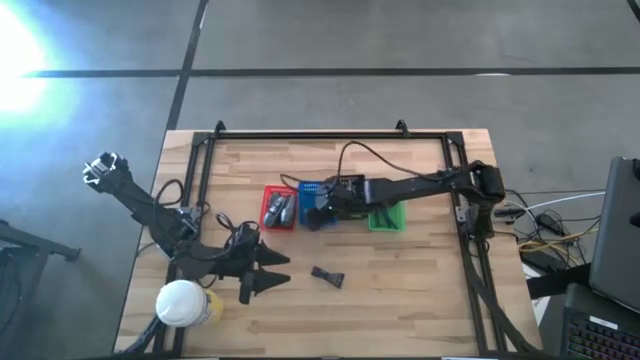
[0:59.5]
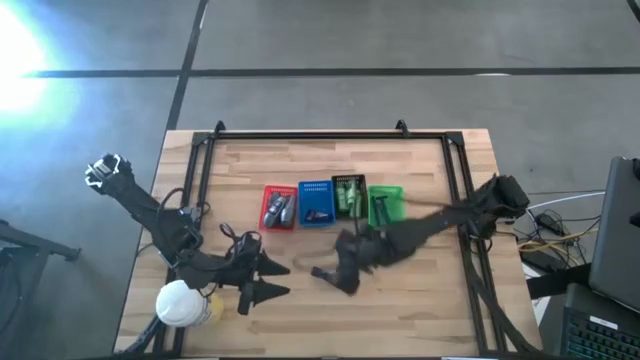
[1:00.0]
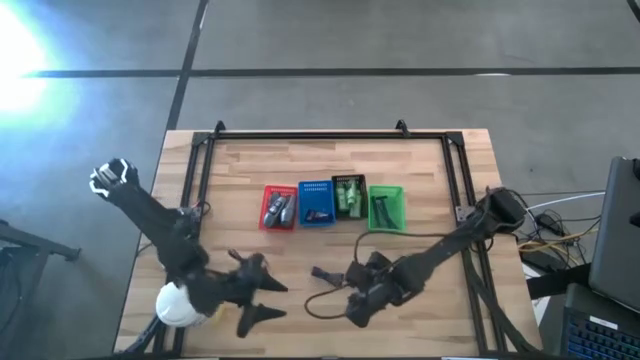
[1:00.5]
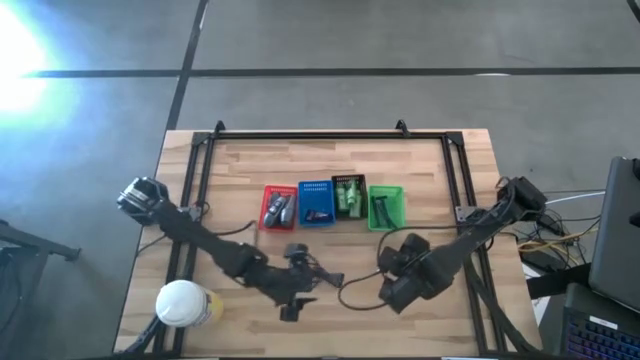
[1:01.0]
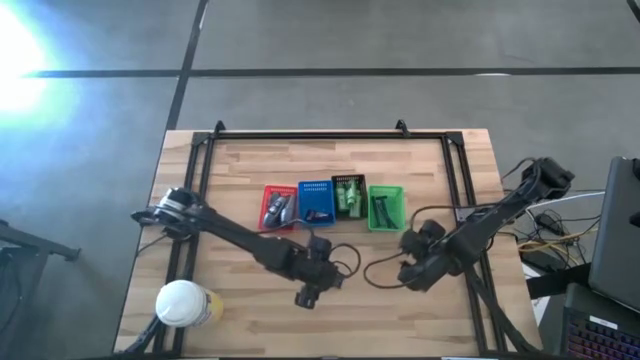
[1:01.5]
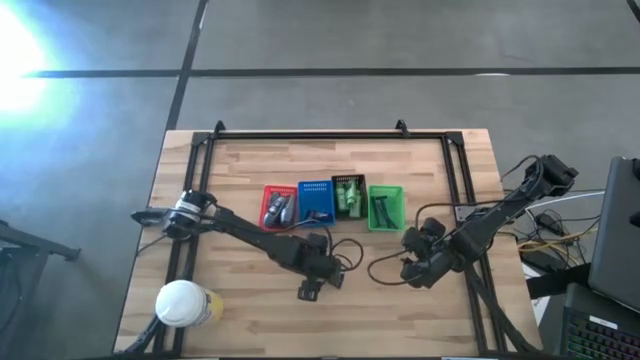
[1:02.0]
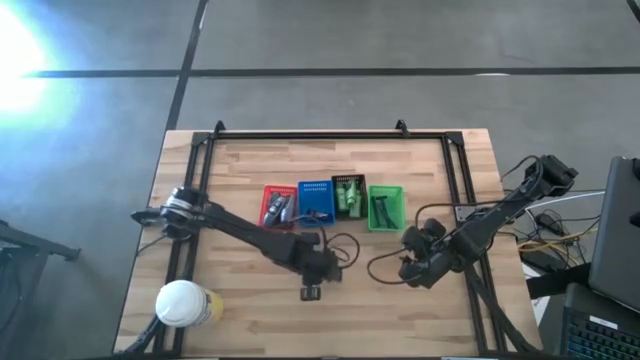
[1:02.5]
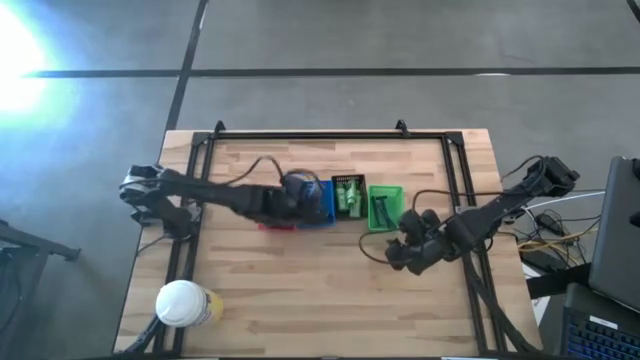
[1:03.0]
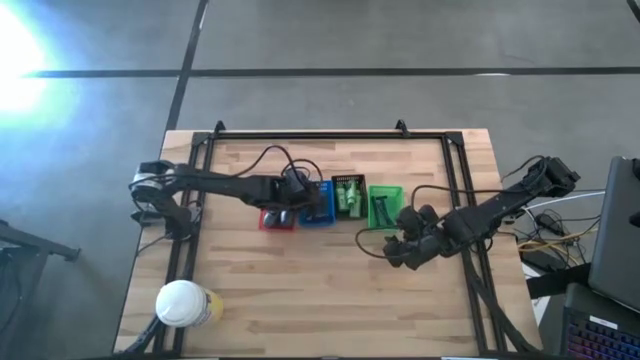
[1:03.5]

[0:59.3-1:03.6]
Task: Pick & Place Travel size toiletries
Put the black shave cream into the blue bin

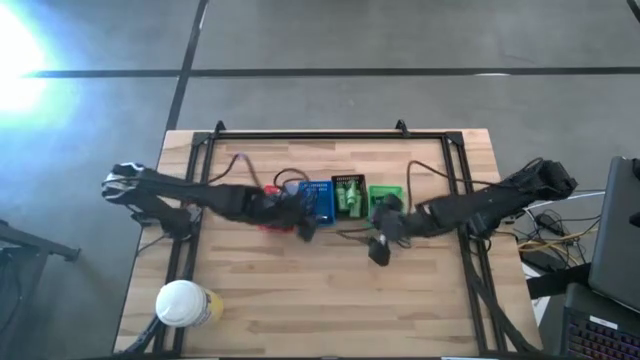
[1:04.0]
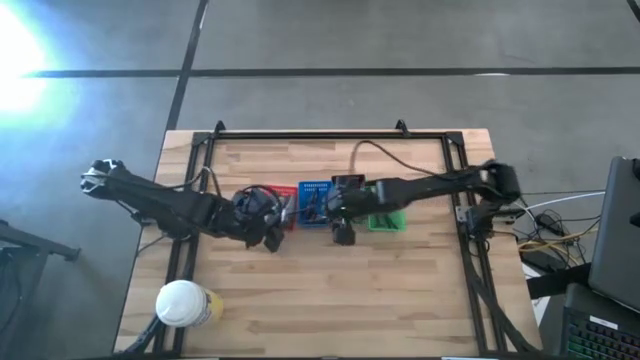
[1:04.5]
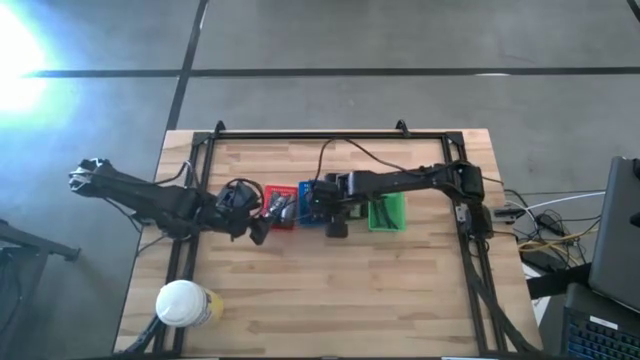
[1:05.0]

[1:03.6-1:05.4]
Adjust the black shave cream into the blue bin

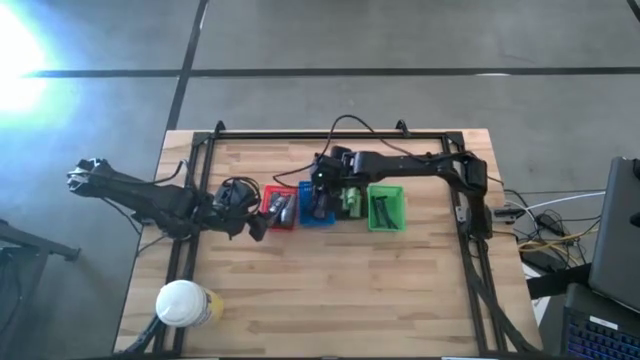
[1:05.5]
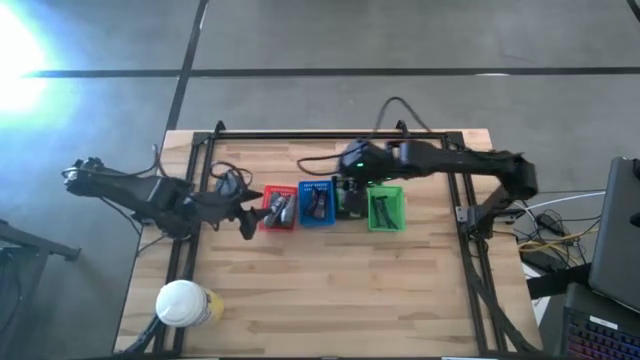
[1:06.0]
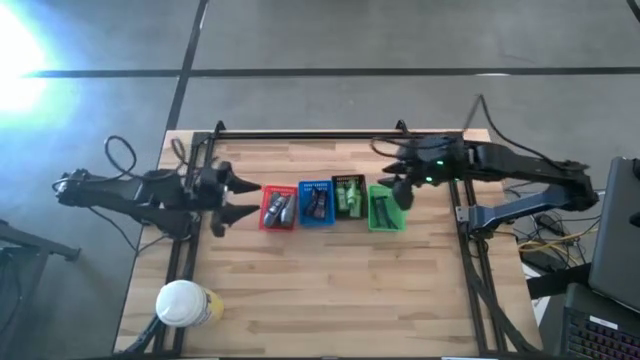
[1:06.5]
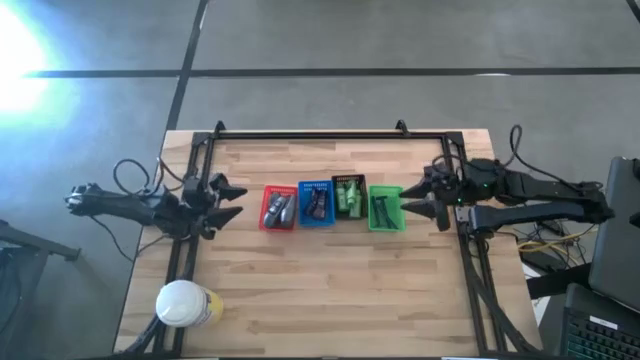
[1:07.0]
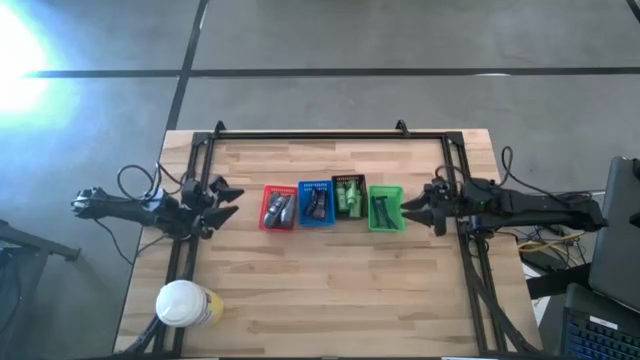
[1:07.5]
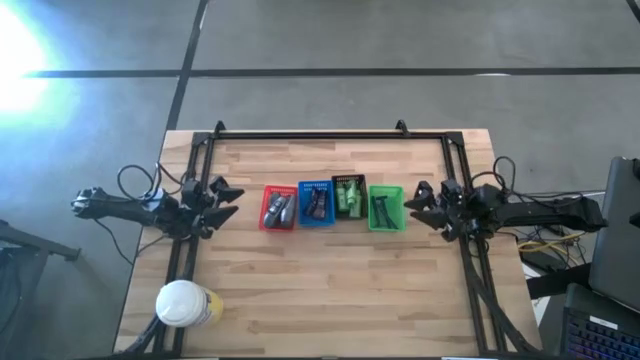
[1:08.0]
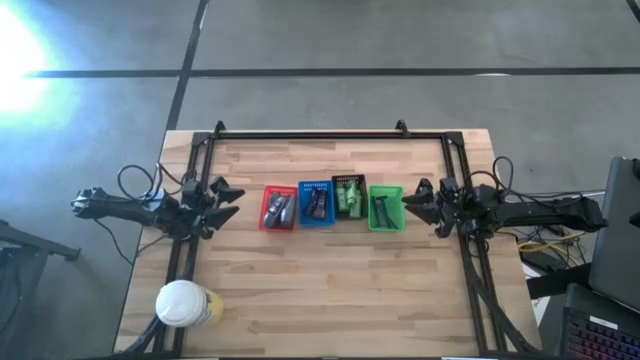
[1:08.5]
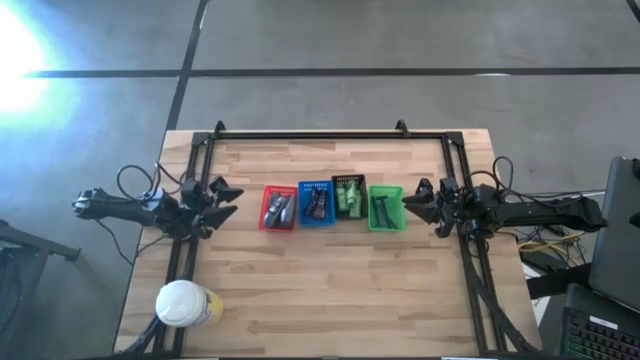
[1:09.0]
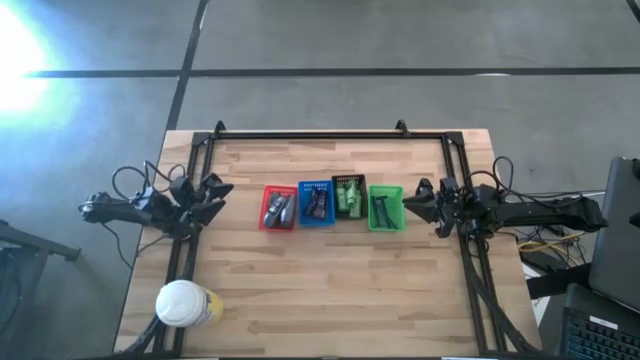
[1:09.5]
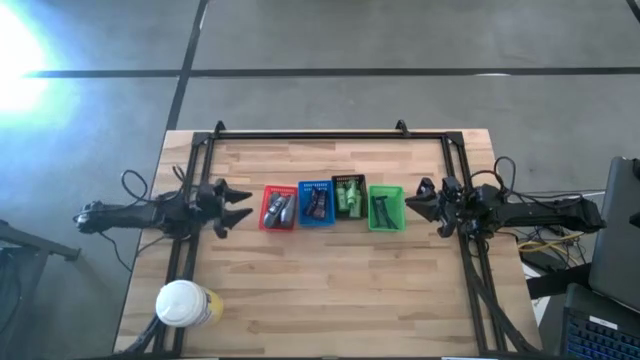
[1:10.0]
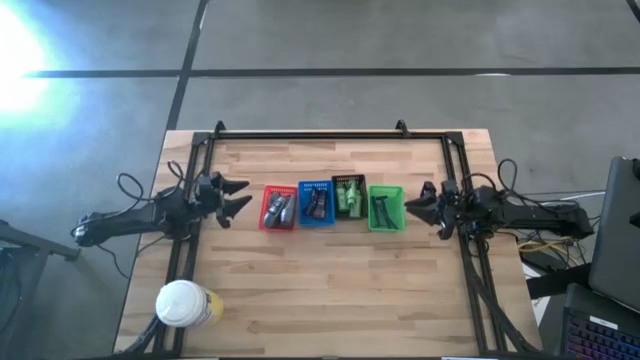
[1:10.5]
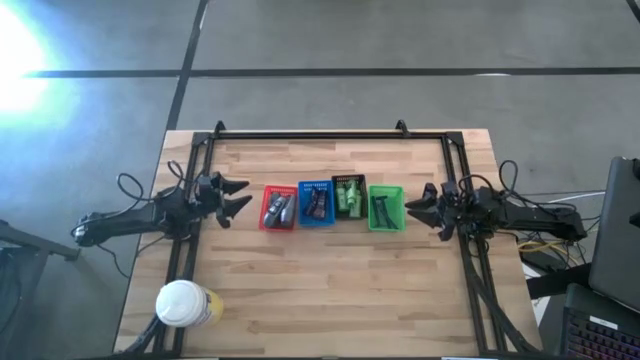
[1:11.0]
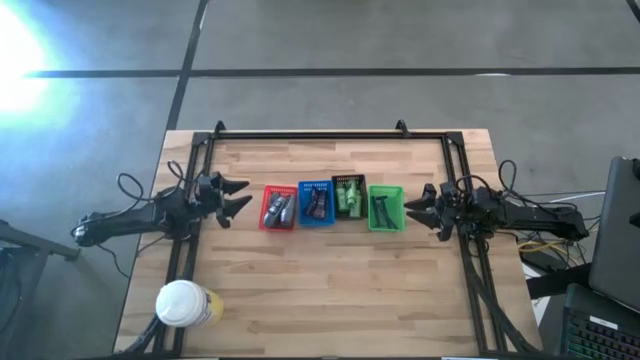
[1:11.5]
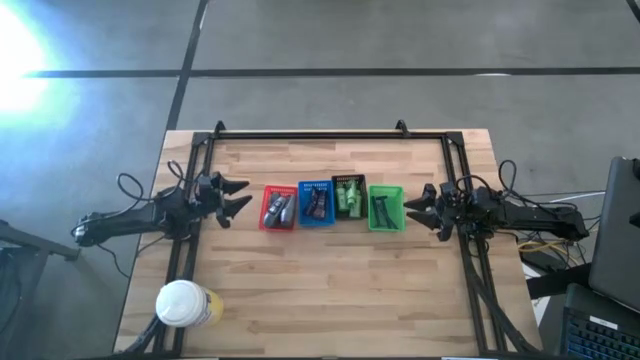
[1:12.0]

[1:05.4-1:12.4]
Return to Home Position

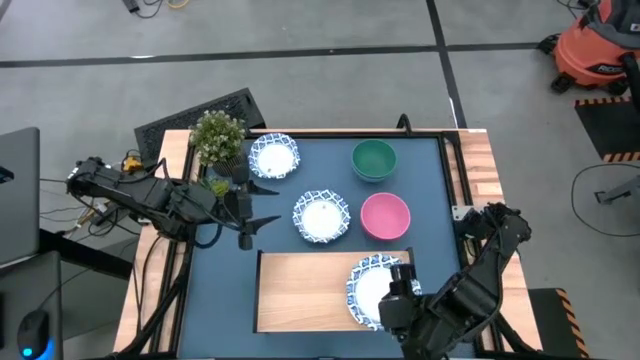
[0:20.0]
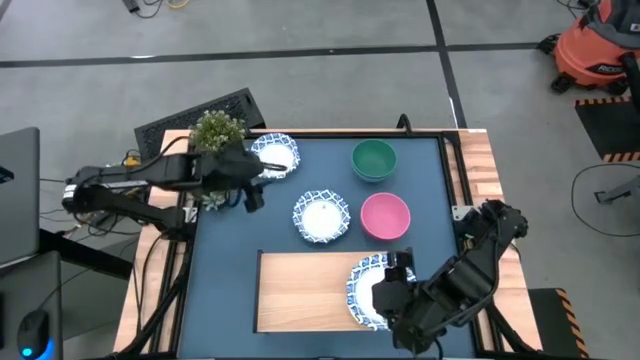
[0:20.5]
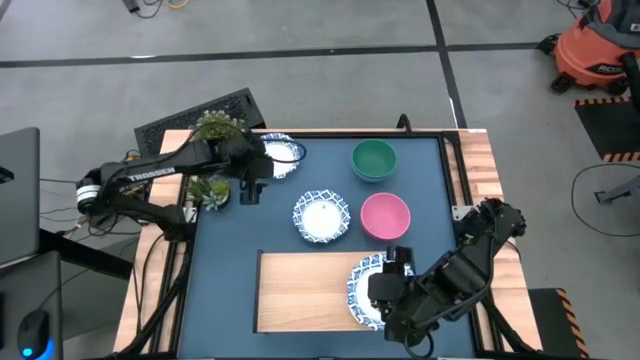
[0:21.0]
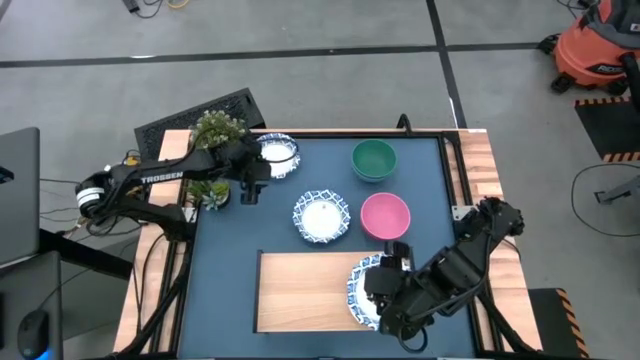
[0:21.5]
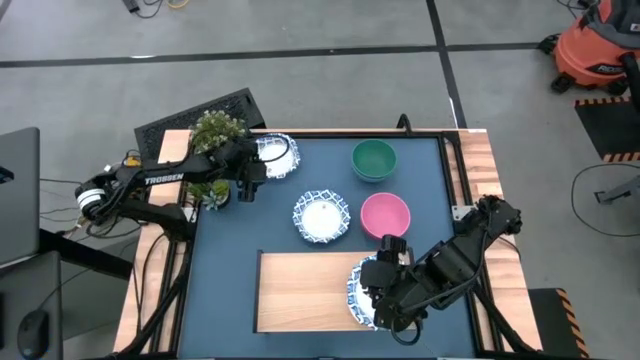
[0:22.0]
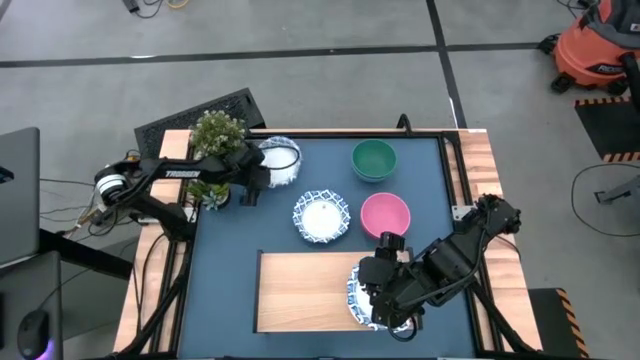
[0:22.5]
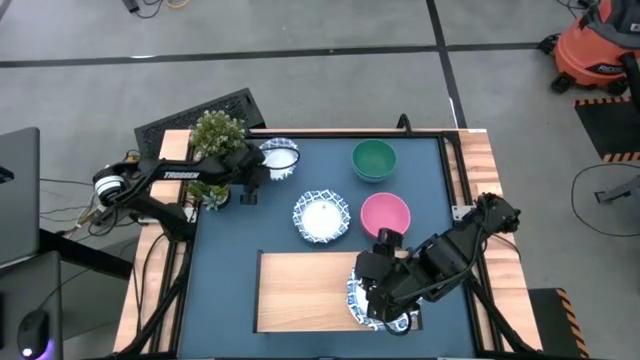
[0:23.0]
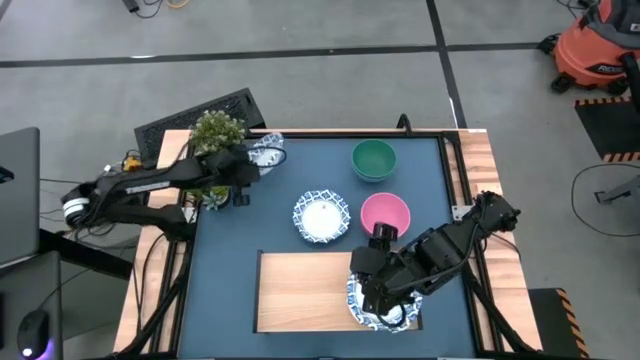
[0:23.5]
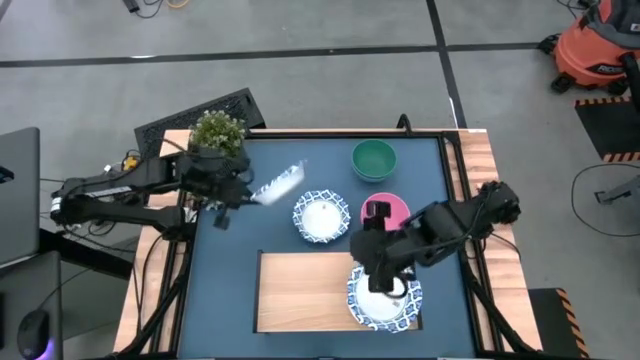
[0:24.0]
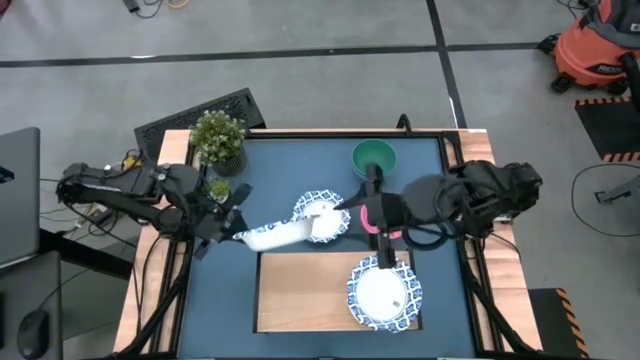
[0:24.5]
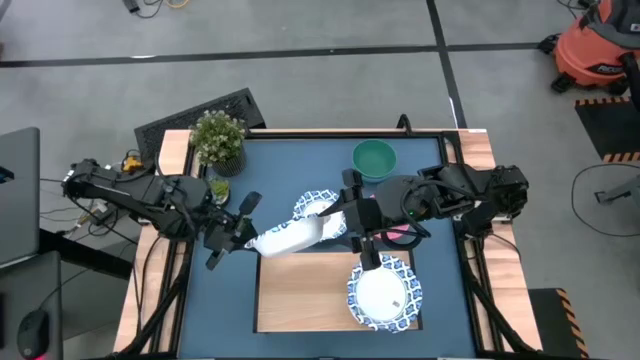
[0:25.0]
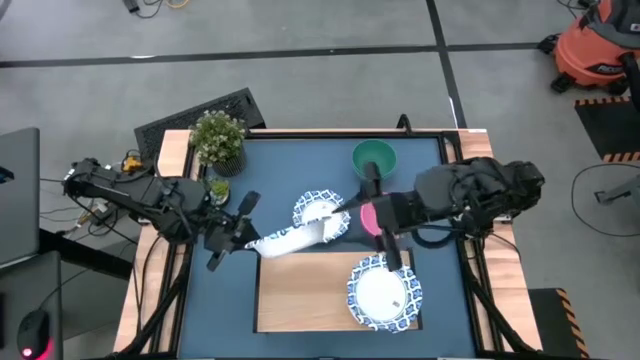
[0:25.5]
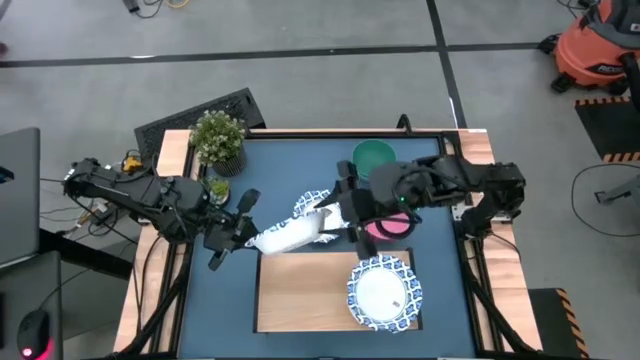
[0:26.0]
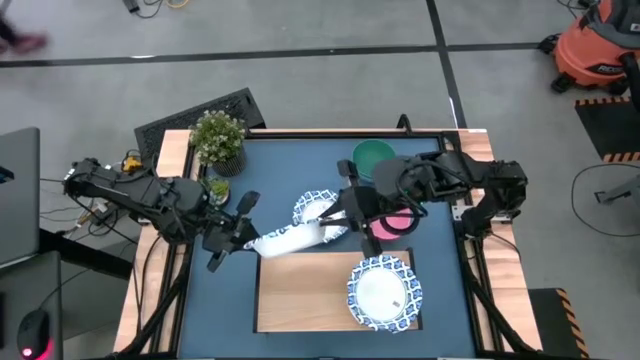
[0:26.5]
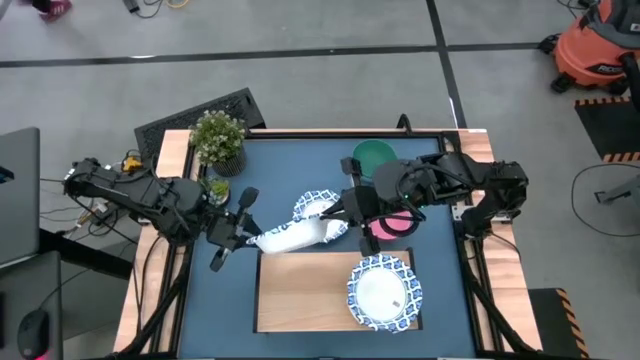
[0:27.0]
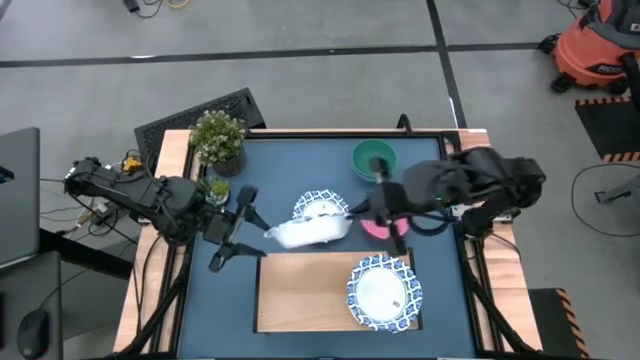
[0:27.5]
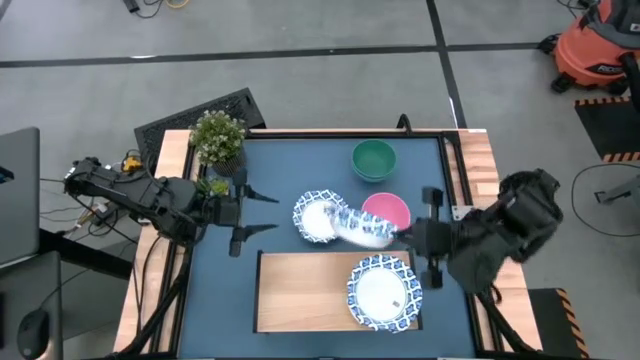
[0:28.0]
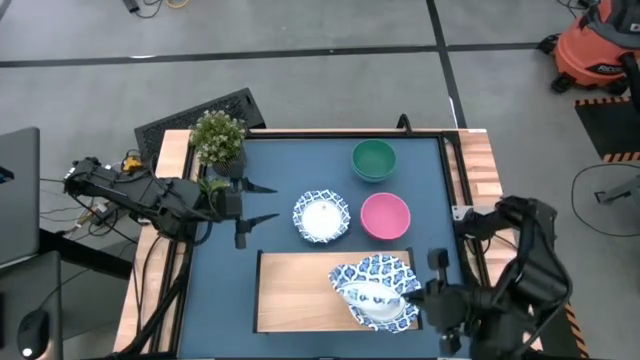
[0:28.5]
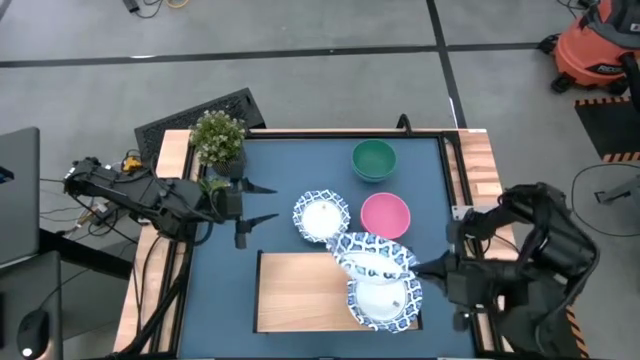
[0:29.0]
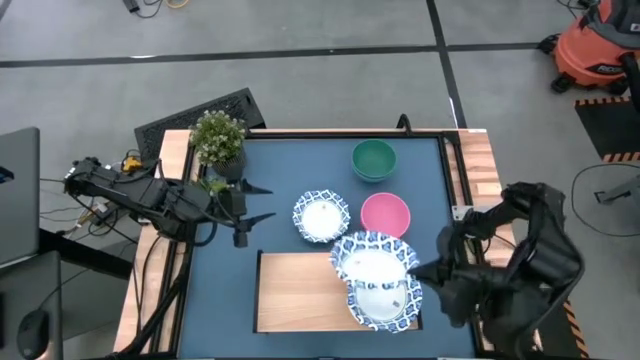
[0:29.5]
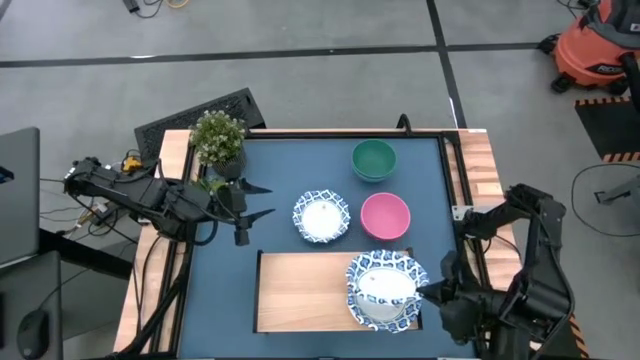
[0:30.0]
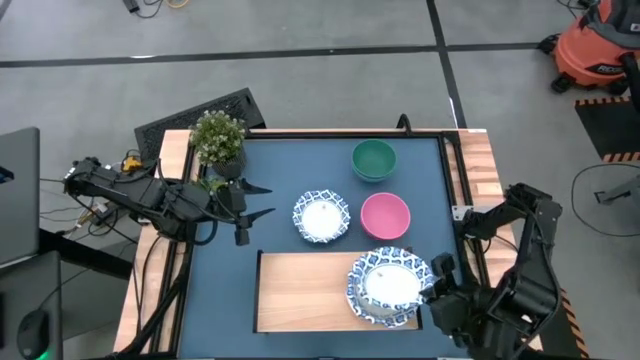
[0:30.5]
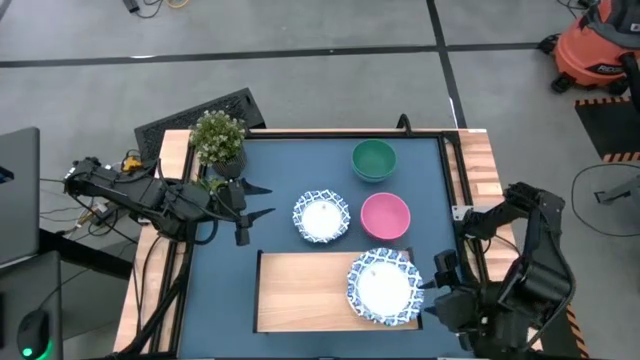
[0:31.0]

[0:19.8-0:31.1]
Task: Place and stack bowls onto a shelf
Stack the blue patterned bowl on top of the blue patterned bowl on the shelf
